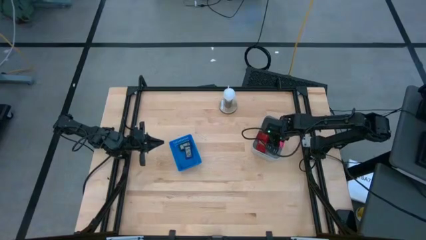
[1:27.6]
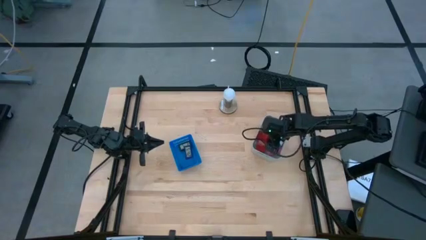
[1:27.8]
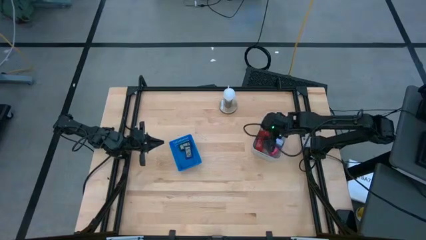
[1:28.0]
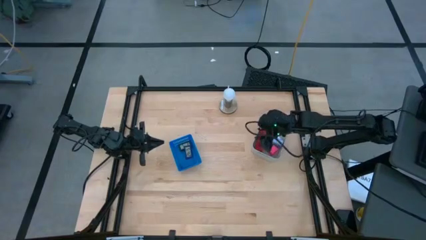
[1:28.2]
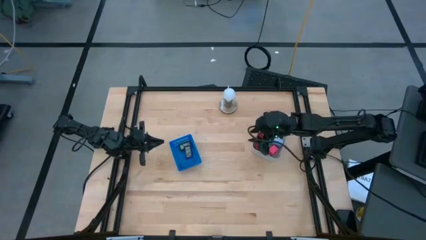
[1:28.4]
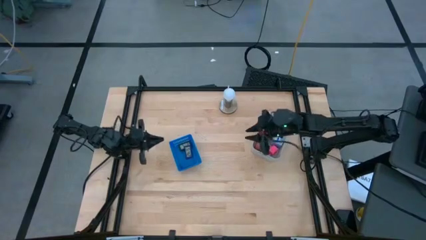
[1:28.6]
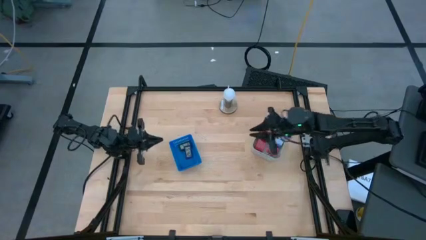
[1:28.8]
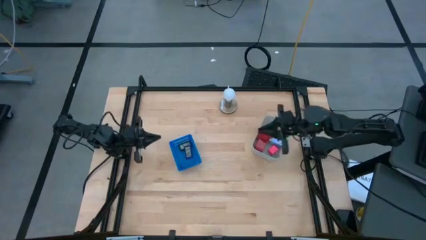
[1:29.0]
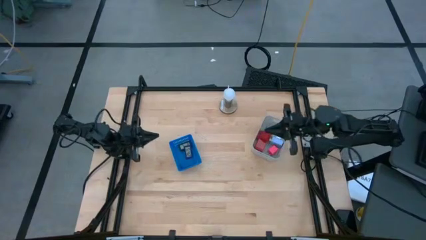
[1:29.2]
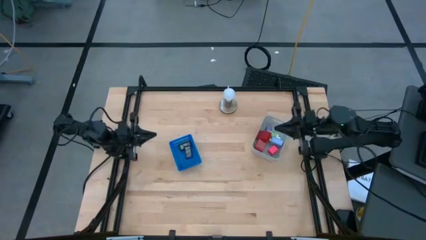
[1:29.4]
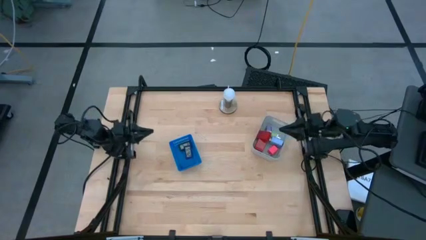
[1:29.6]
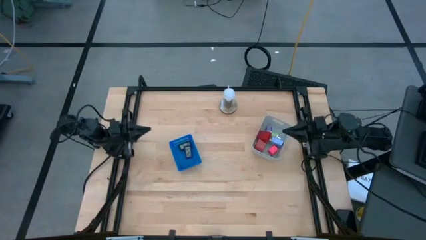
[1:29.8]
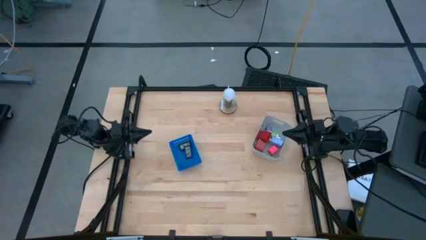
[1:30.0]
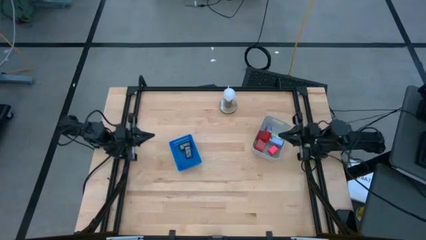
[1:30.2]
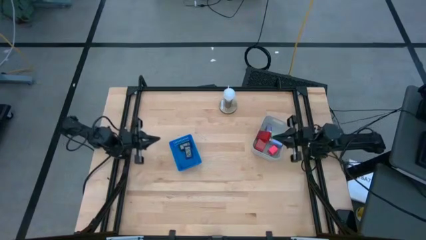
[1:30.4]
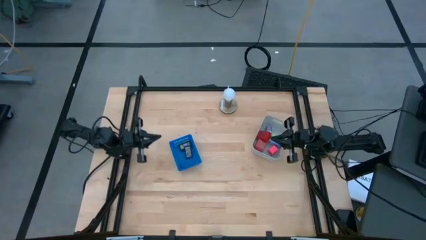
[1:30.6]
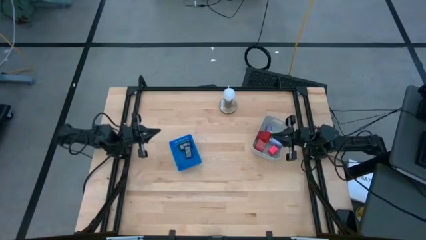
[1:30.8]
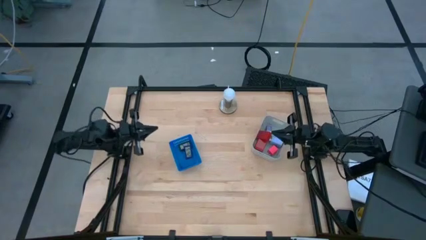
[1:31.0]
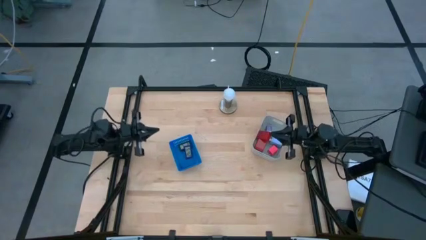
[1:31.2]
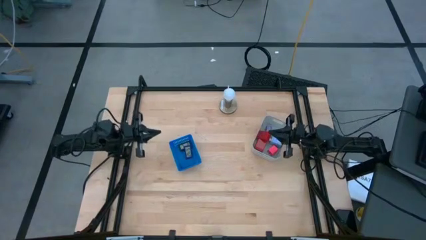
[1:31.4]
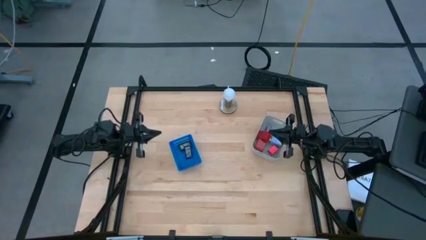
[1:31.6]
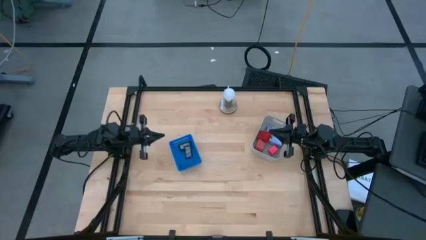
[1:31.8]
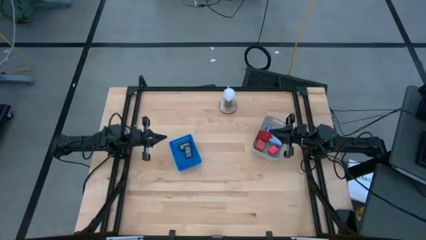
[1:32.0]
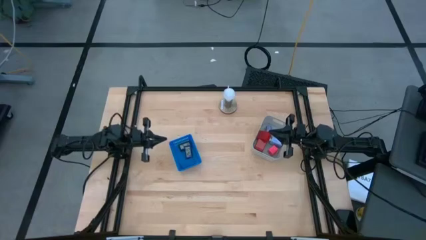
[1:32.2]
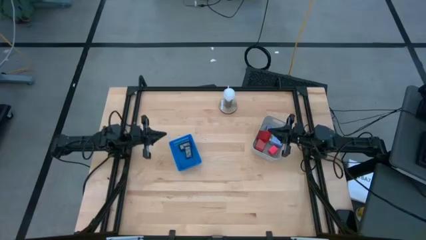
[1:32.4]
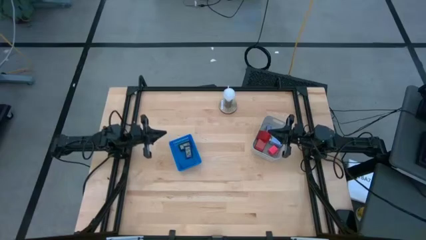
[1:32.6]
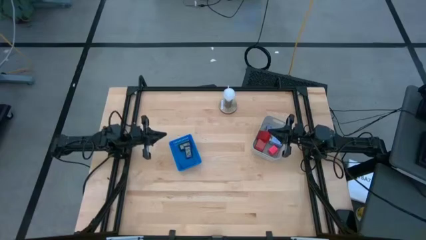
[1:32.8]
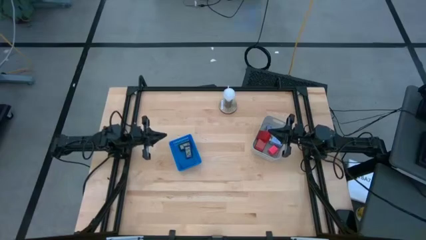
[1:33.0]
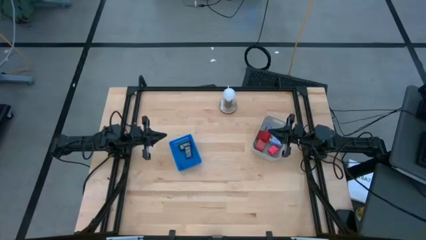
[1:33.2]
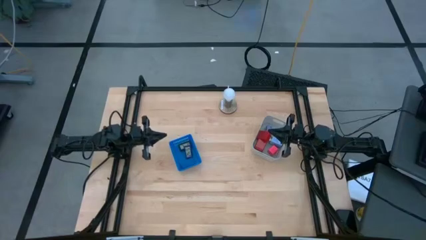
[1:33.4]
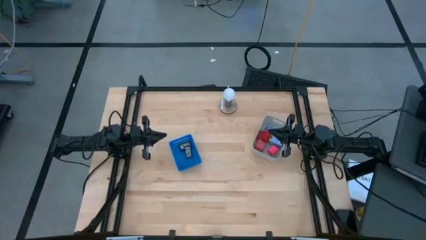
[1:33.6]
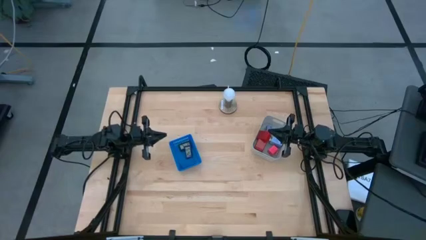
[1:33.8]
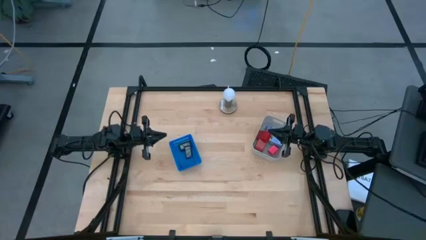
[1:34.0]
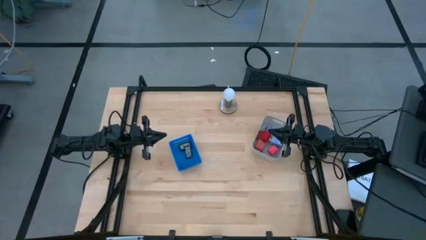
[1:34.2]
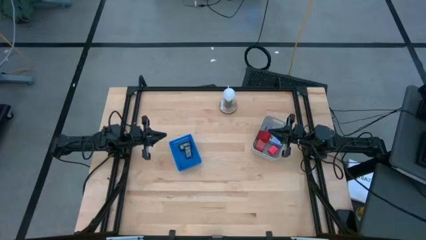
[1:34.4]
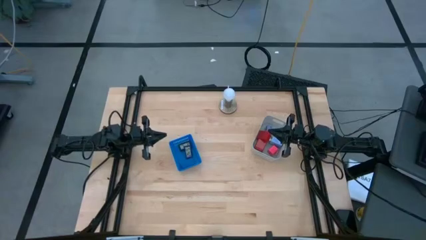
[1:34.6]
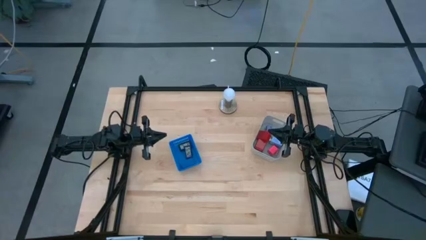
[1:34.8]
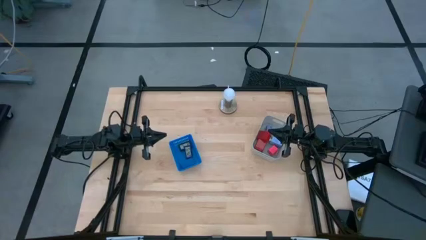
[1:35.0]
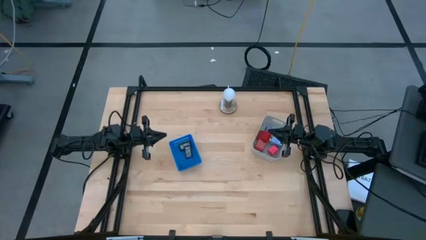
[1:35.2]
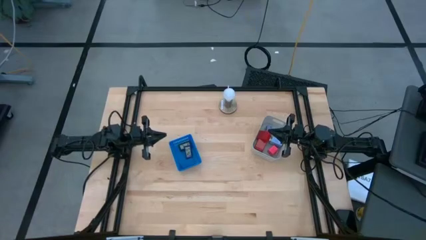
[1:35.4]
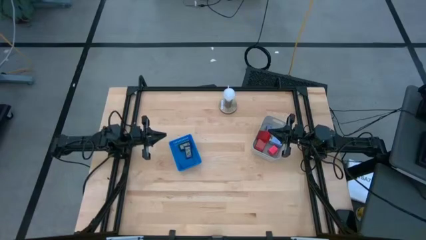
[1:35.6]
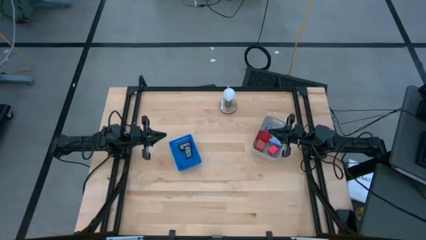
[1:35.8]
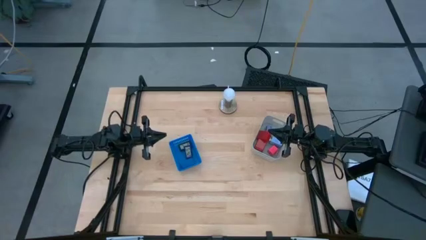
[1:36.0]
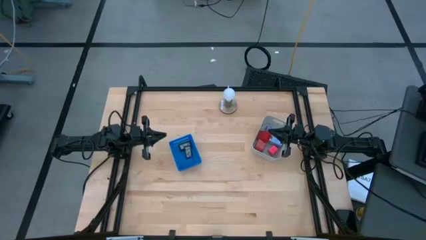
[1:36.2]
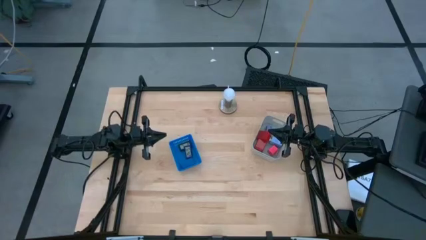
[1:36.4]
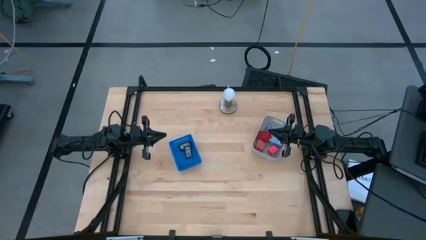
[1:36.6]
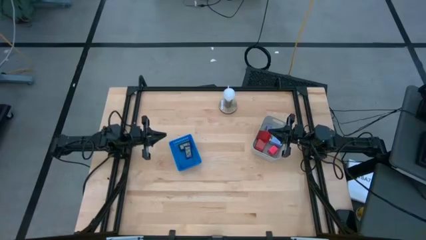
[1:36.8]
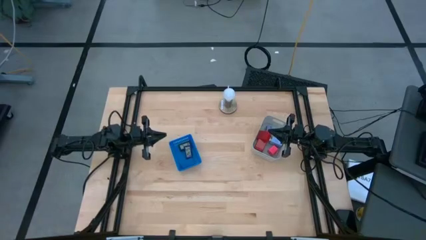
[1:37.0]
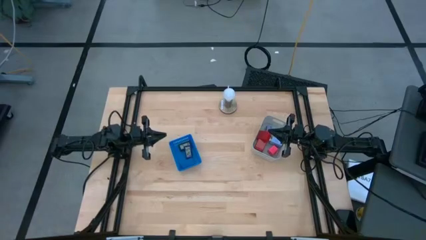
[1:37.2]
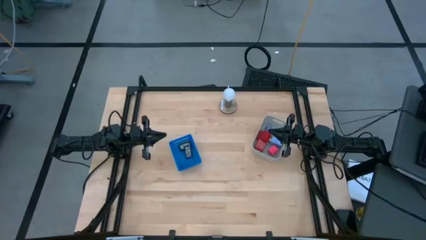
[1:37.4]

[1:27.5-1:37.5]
Task: Pick & Place Office items
Return to Home Position

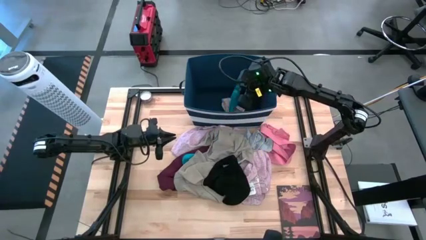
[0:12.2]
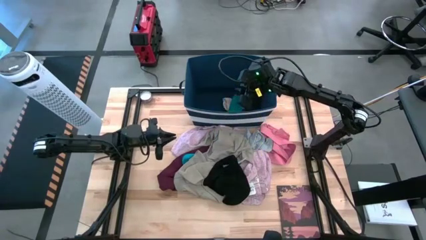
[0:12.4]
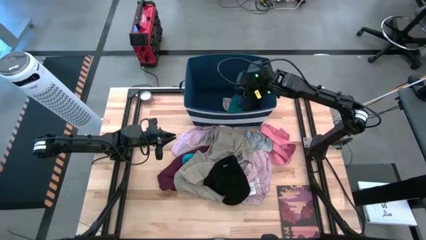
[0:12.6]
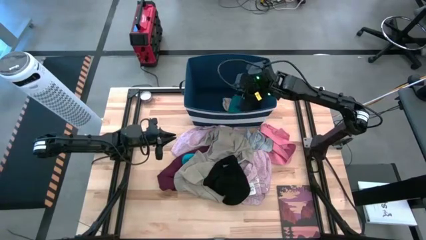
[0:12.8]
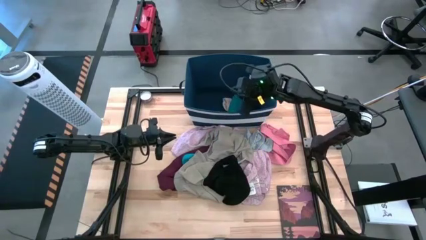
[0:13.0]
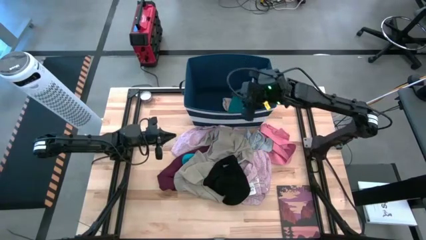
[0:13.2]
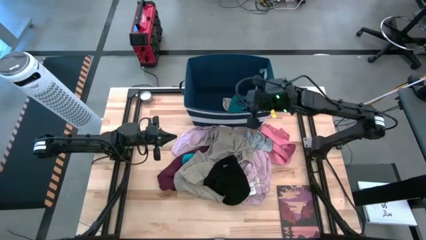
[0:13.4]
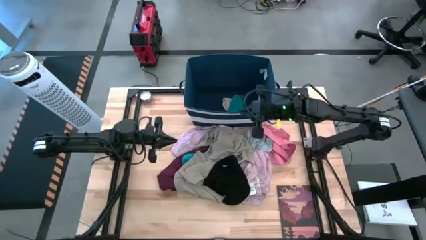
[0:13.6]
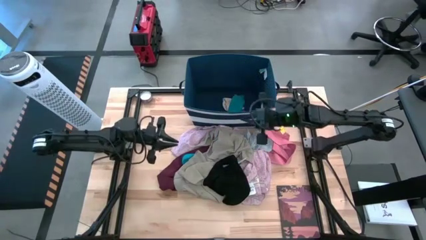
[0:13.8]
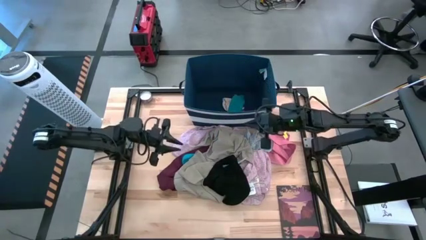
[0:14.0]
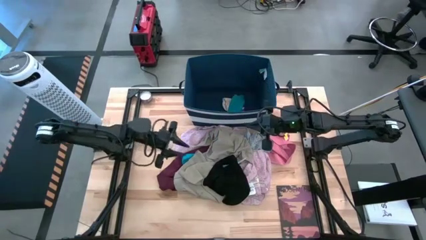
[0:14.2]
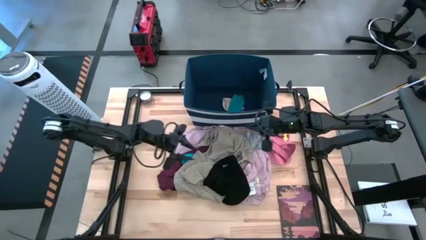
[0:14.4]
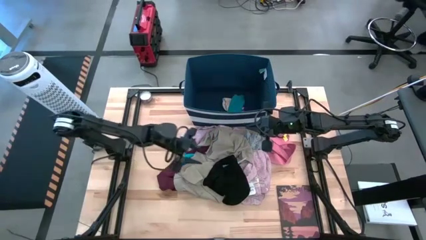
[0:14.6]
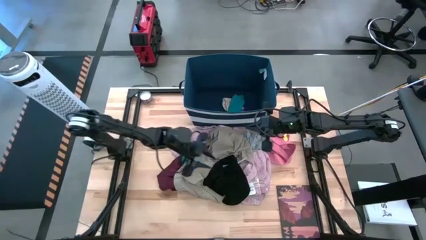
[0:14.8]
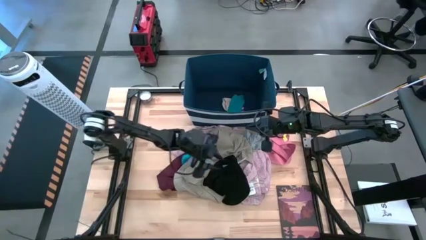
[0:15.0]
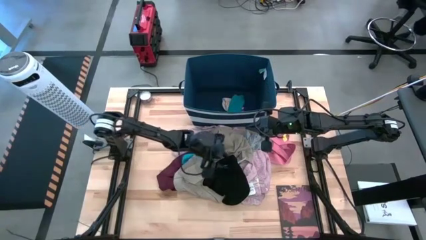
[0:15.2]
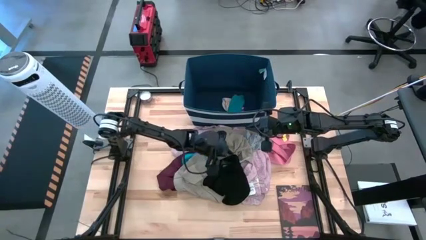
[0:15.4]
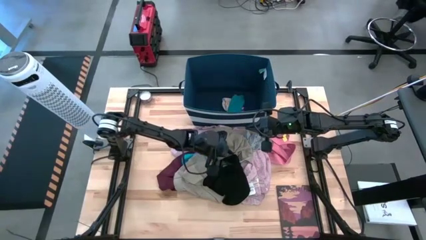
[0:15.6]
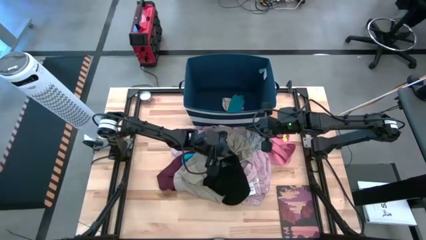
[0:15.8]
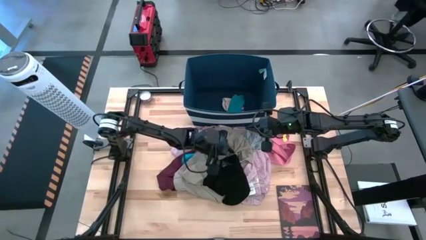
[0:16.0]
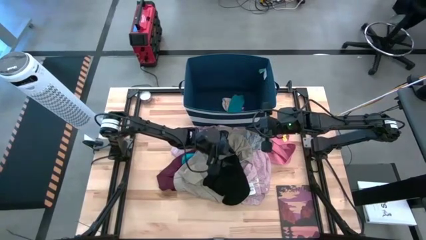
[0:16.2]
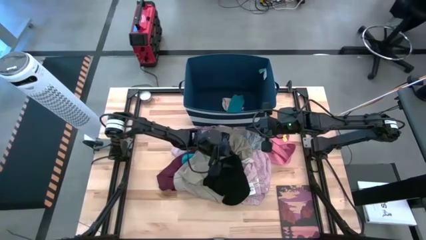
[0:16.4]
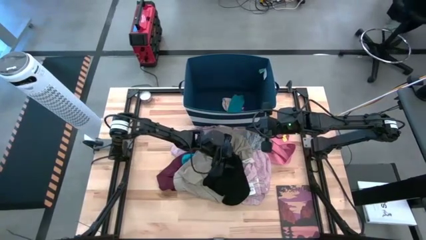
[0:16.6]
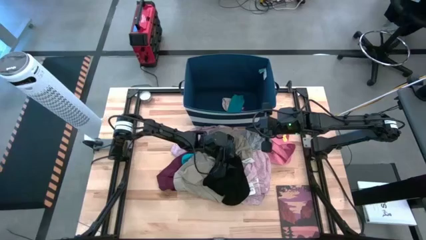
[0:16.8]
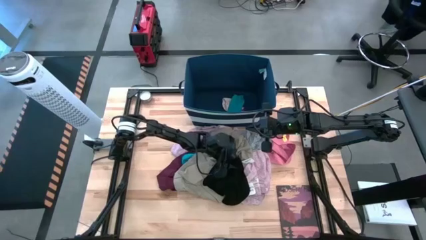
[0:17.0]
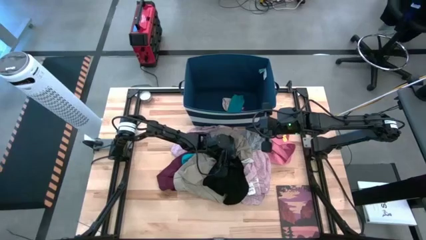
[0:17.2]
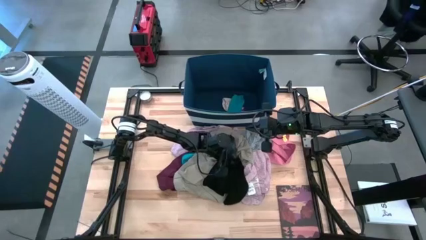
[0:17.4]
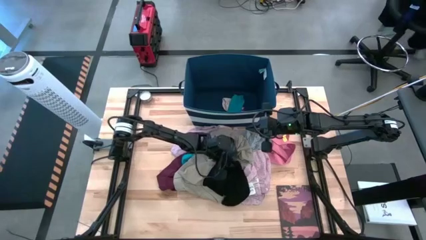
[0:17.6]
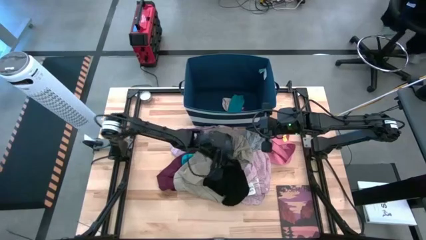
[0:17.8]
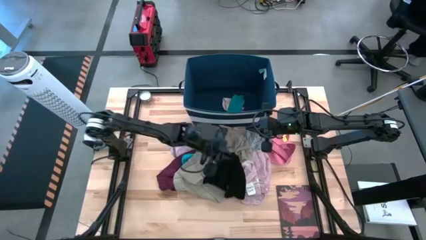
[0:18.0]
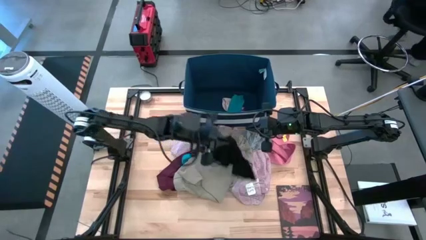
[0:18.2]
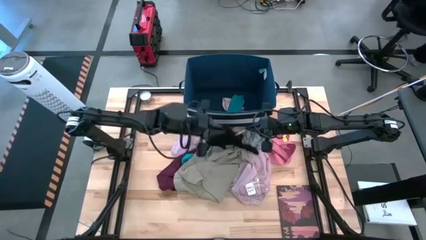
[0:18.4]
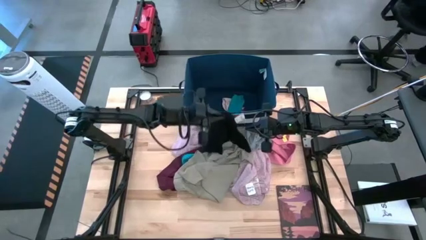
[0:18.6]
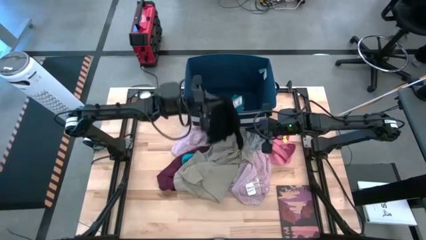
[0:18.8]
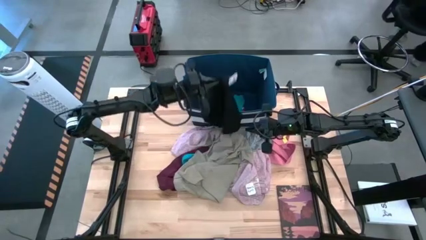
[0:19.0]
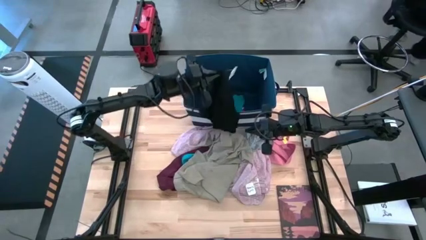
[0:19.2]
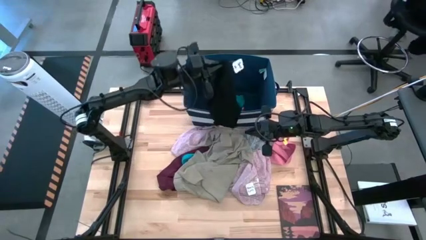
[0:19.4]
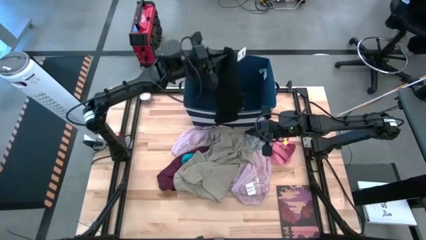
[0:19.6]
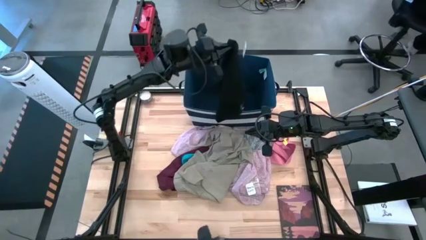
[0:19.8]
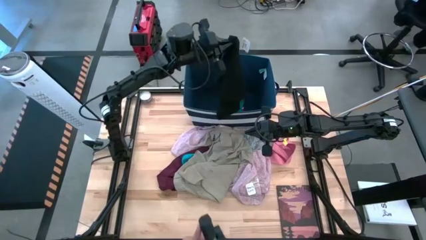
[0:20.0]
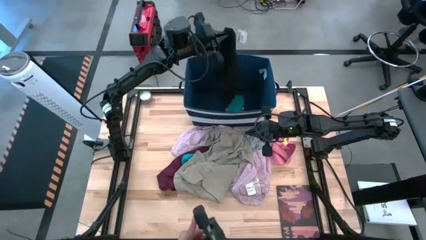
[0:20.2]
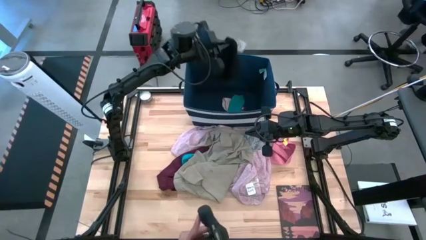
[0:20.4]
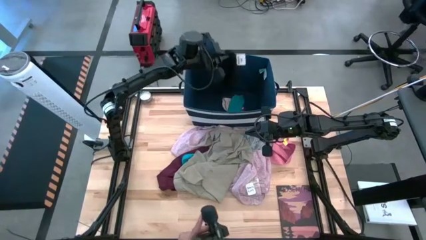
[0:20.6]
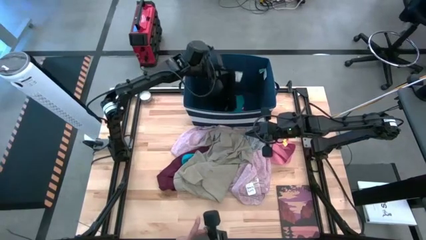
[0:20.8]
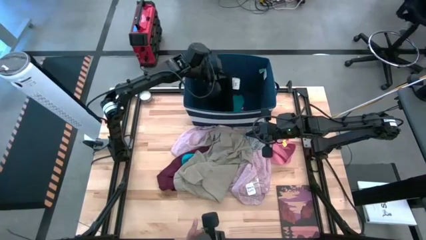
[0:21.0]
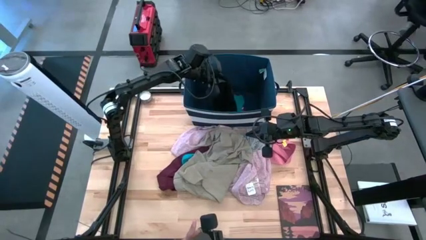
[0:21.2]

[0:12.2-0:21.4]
Task: Sort clothes
Put the black shorts into the blue laundry organizer
